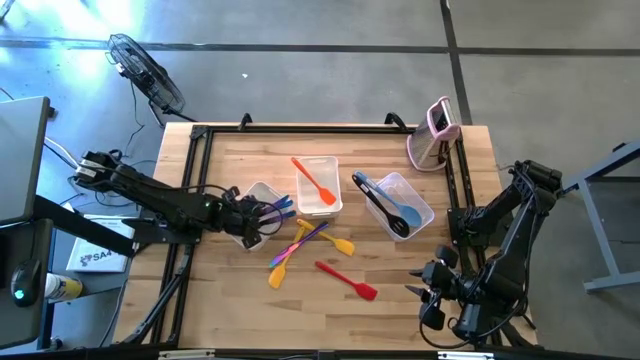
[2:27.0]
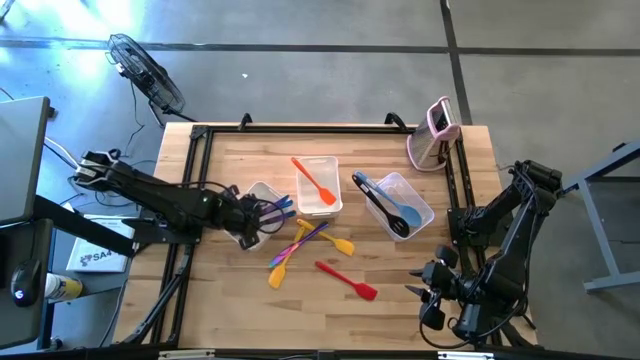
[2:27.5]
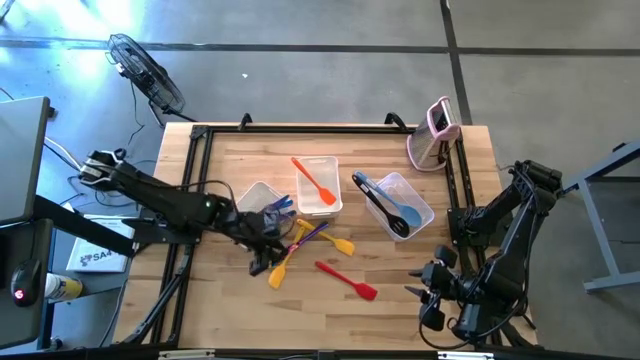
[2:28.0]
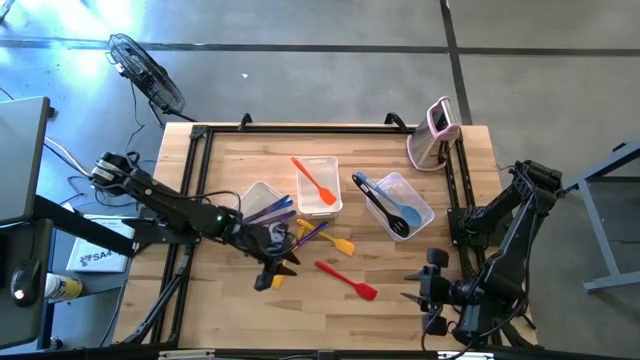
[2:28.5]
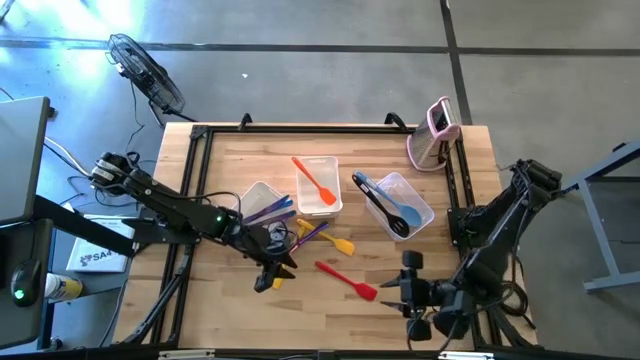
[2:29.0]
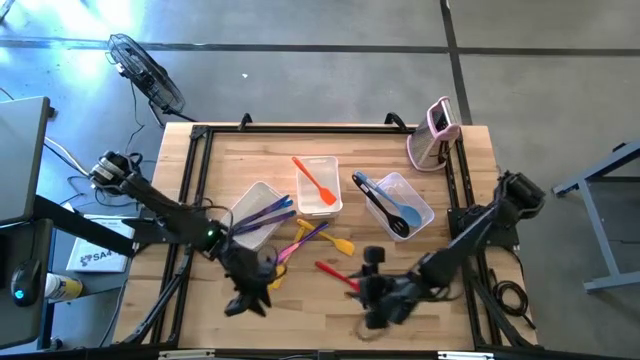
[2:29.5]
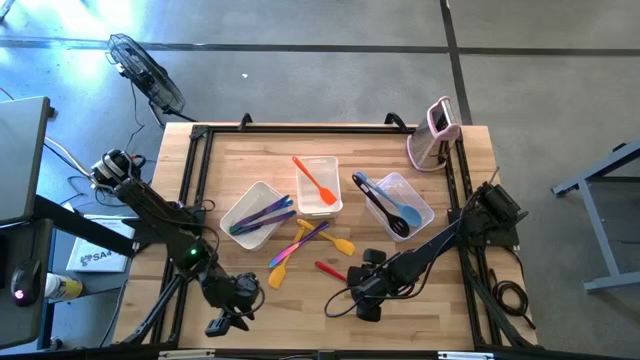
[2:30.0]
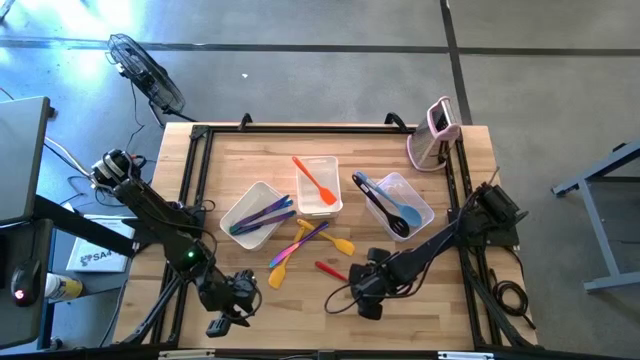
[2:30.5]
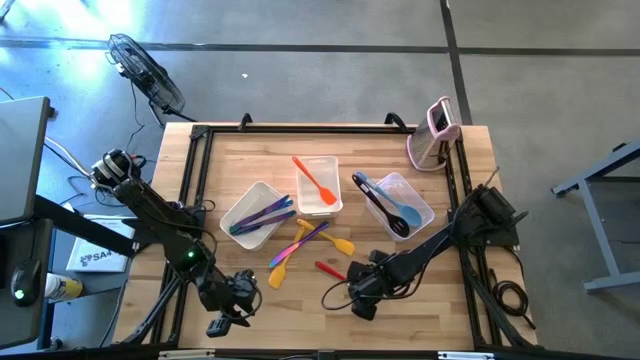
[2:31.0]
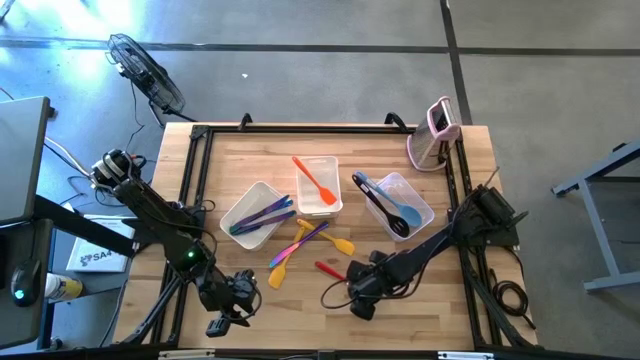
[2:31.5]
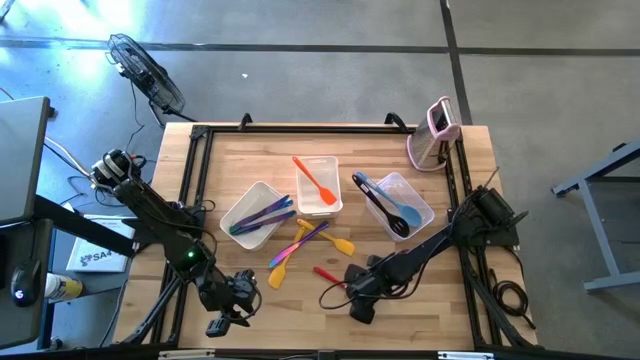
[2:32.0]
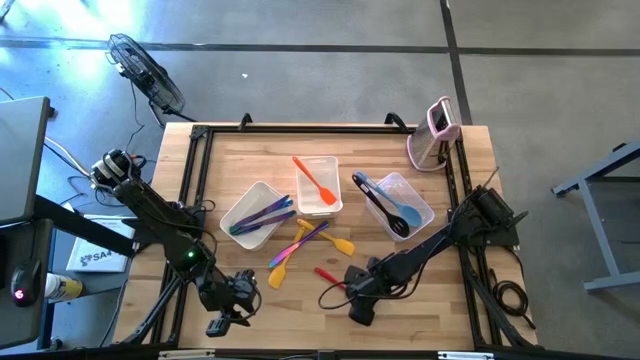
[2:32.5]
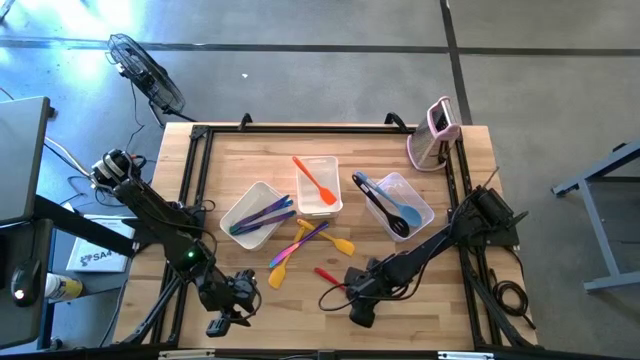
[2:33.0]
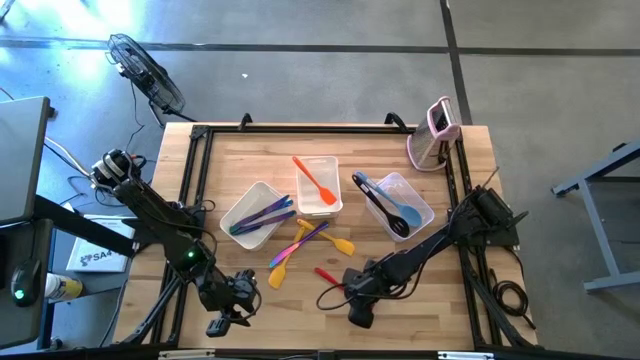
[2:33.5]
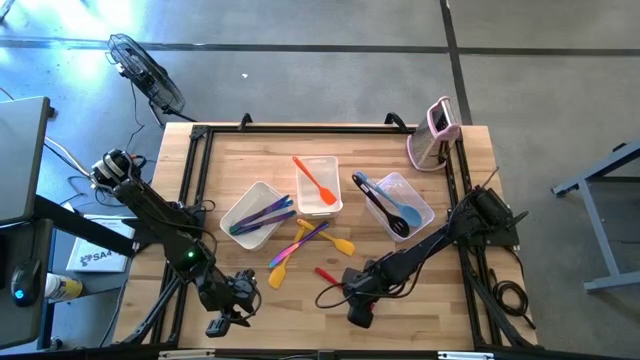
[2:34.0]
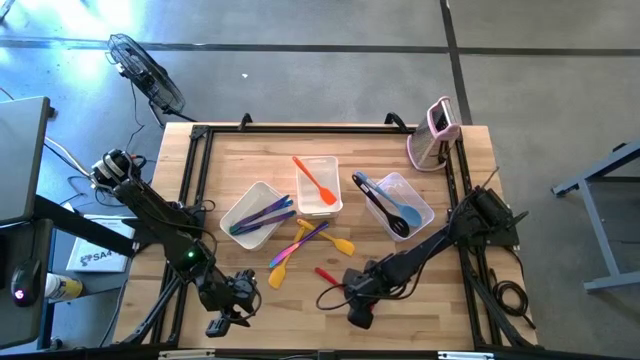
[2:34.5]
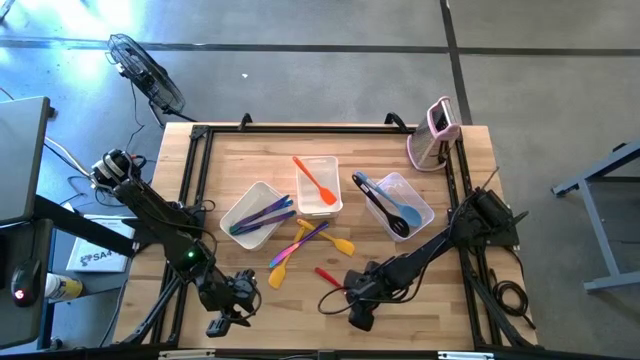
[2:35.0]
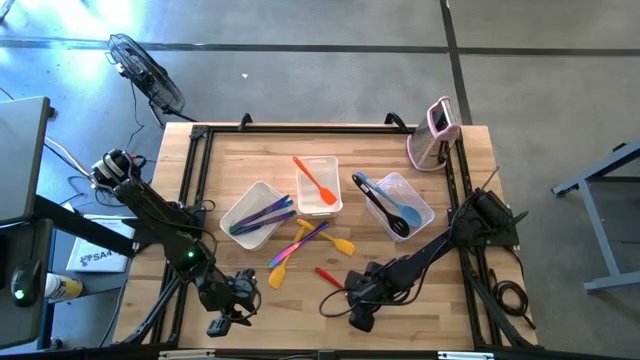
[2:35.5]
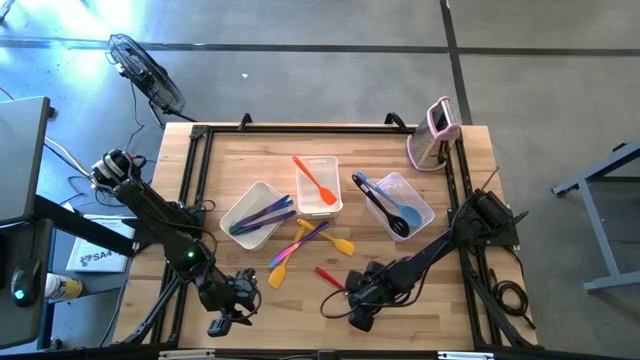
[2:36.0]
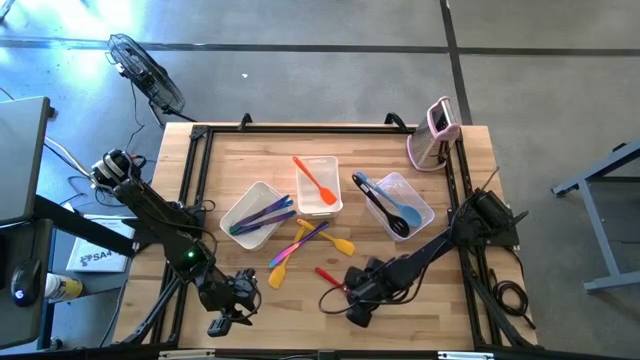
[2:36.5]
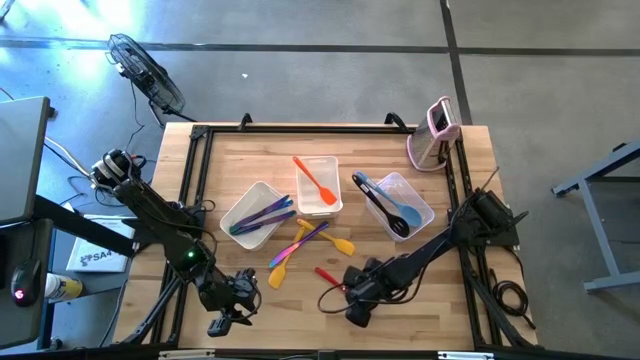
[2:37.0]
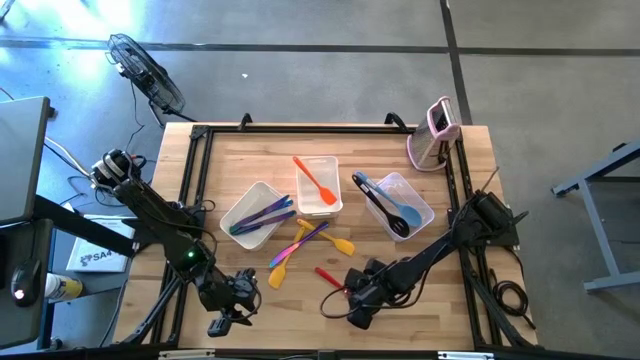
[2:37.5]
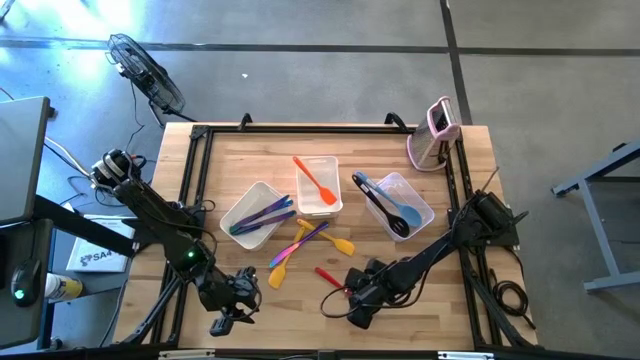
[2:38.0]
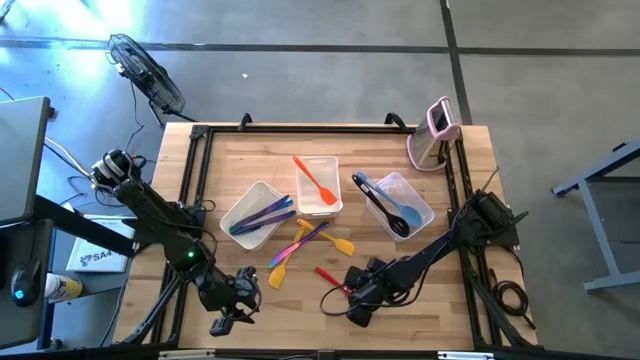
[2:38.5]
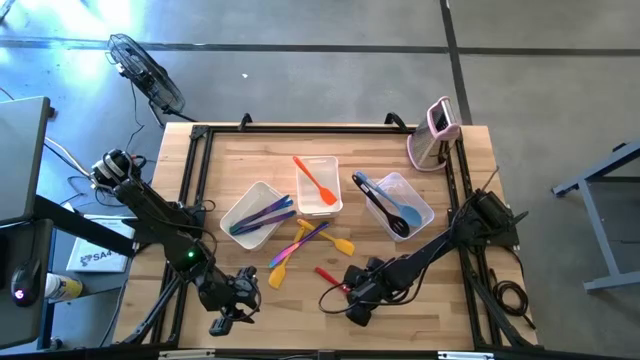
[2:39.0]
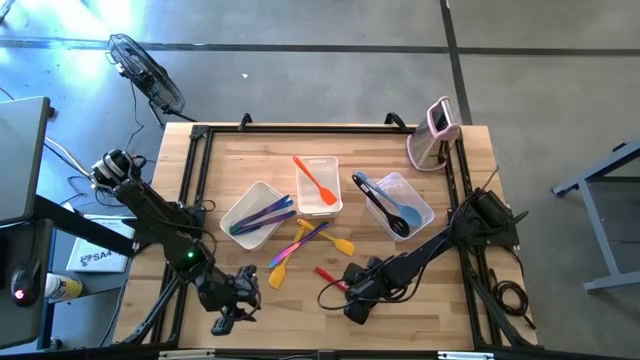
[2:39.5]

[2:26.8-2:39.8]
Task: Pick & Place Kitchen Items
Put the red spatula into the right white bin

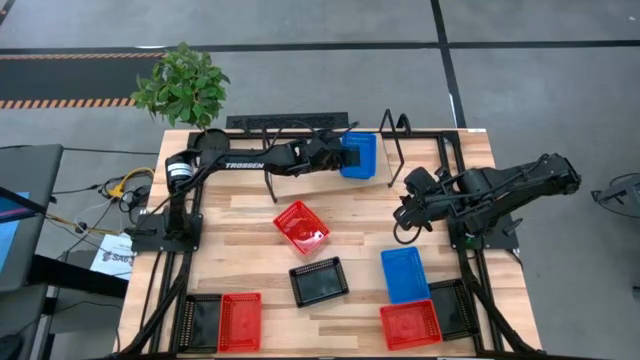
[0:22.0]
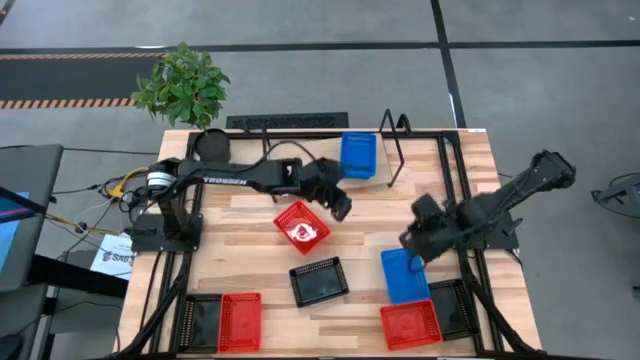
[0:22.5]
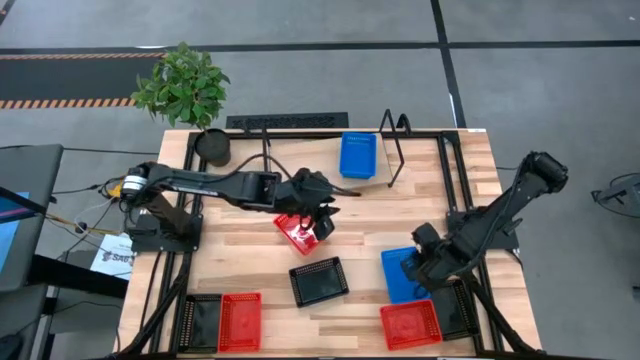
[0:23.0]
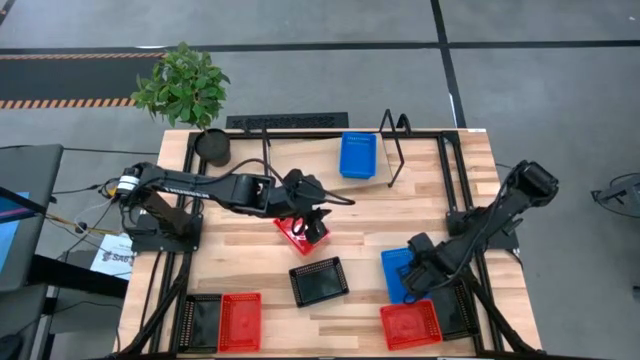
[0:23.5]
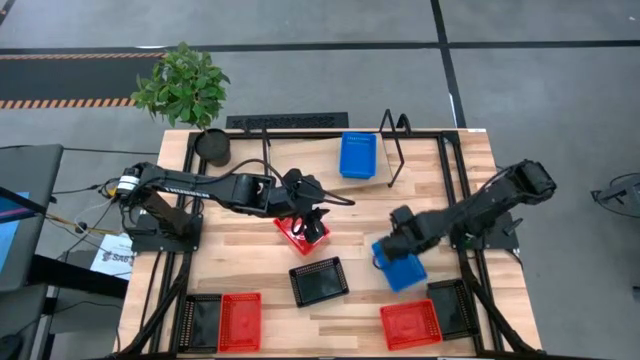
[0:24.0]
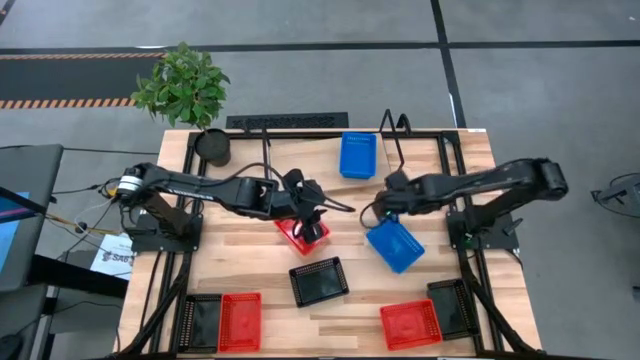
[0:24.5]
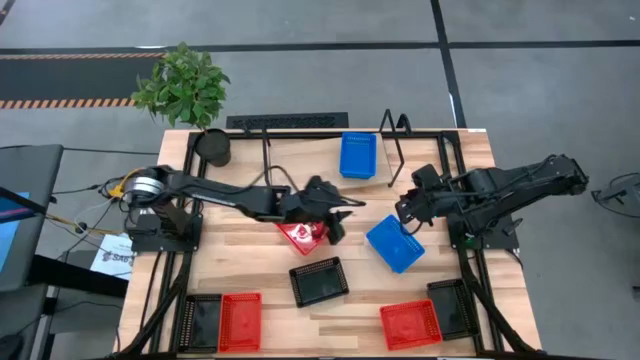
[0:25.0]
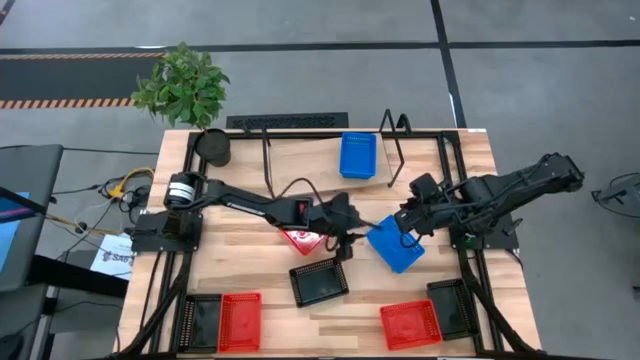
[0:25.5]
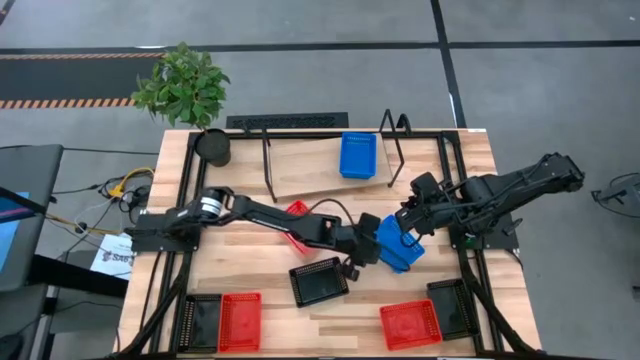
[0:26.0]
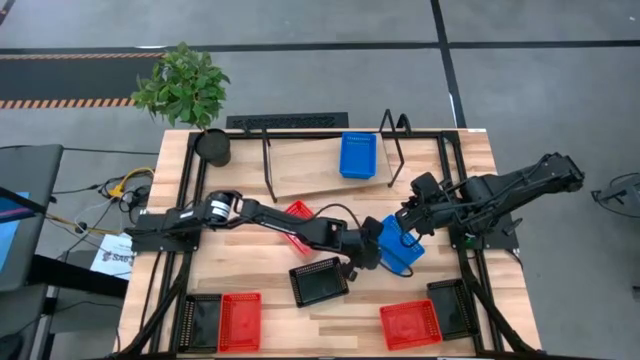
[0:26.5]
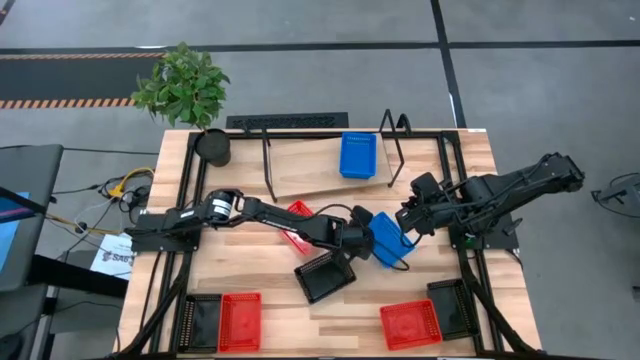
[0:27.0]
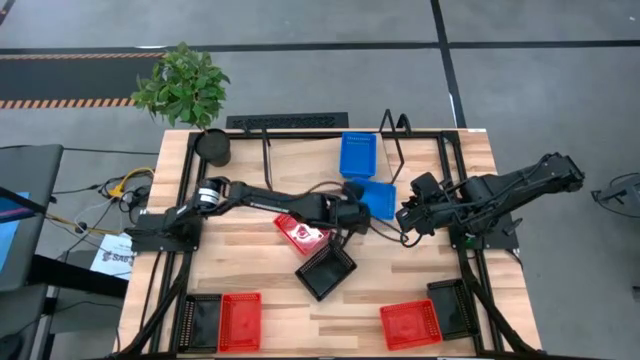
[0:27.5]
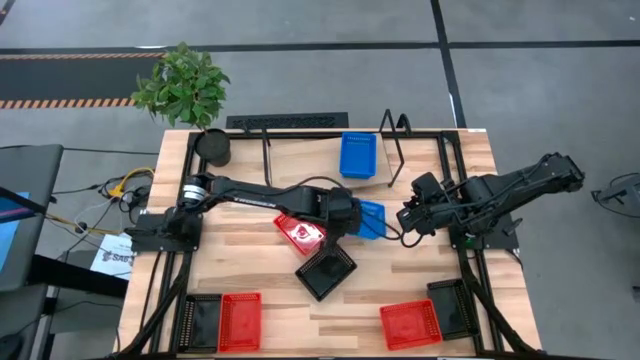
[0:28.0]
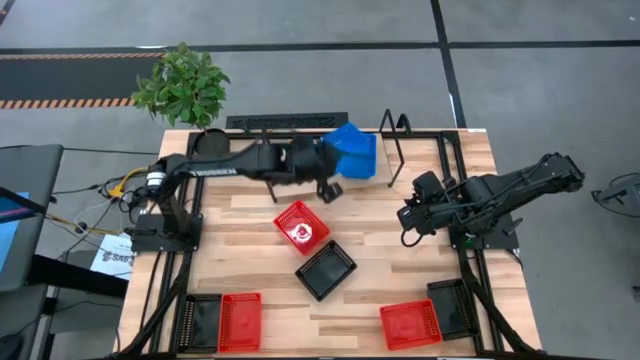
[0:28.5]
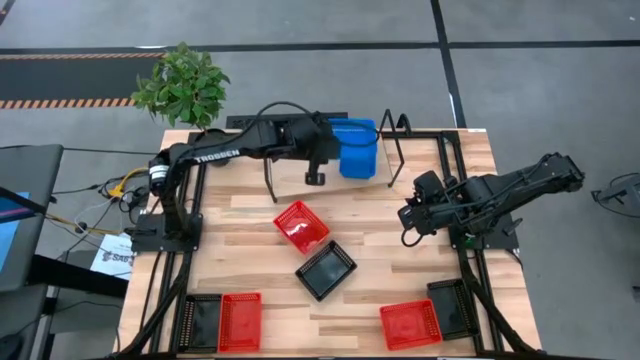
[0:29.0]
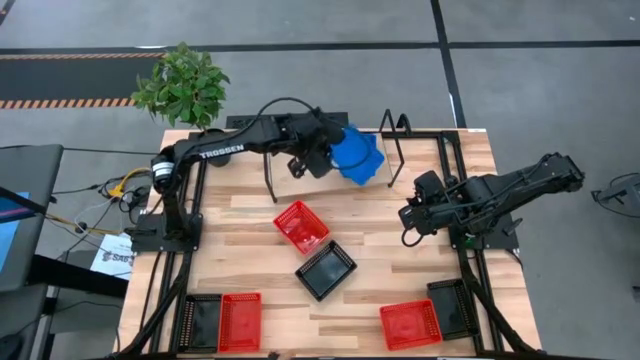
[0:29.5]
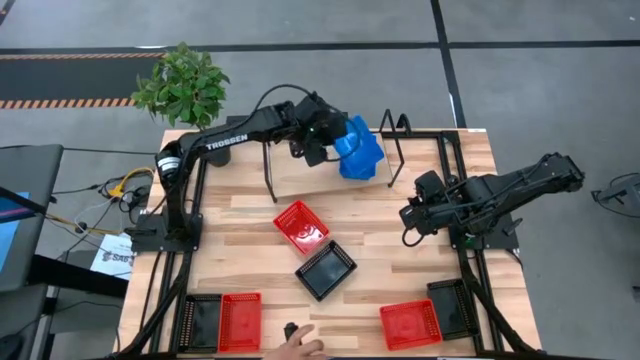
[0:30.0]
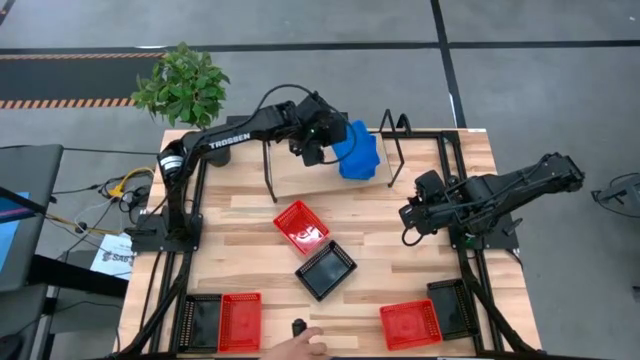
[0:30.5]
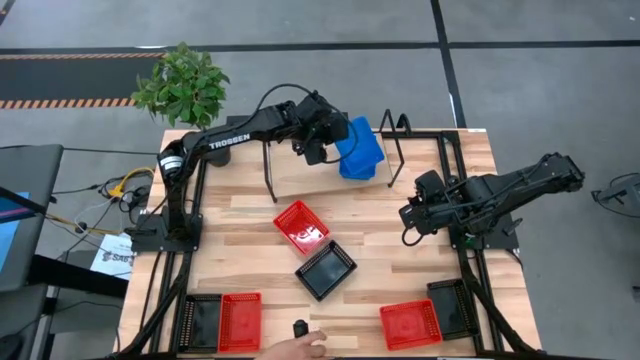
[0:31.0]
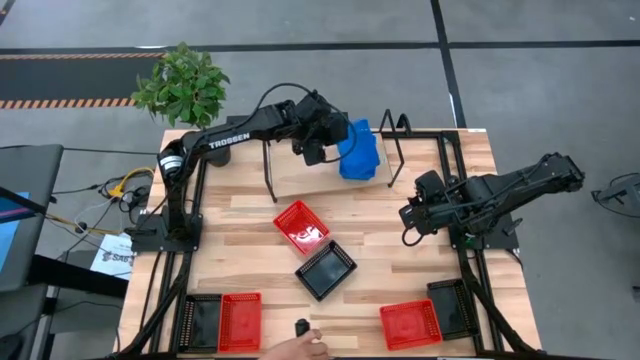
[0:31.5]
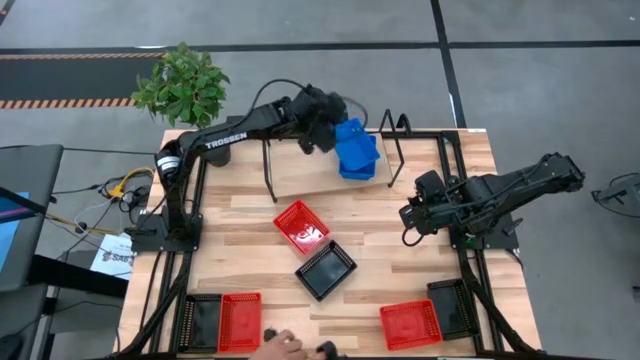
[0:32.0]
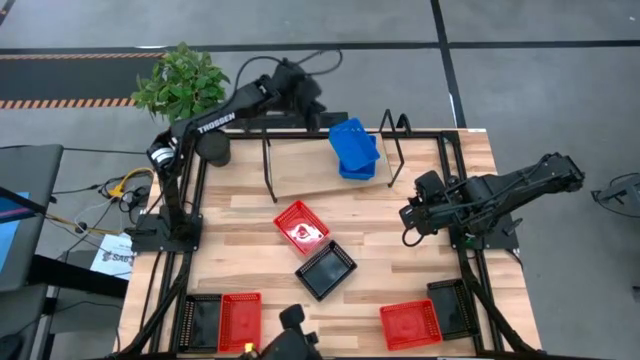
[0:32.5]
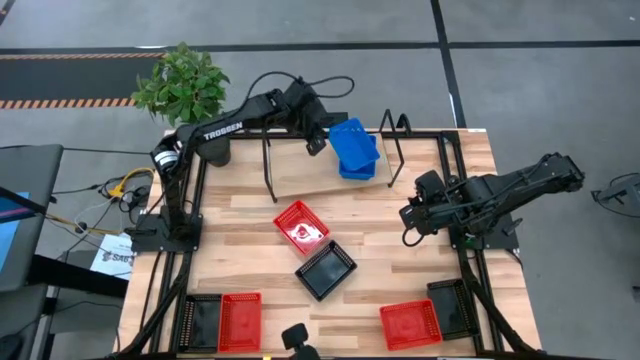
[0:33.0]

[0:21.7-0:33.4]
Task: Stack baskets on shelf by color
Stack the blue bin on top of the blue bin on the shelf
